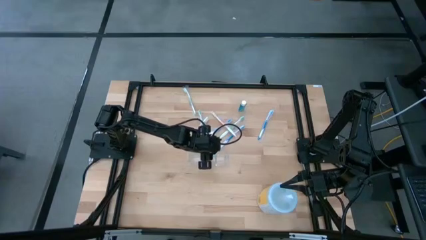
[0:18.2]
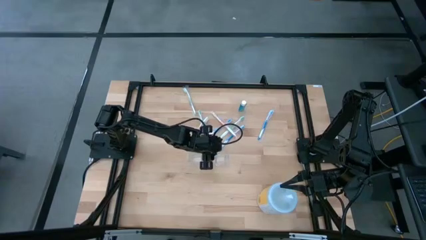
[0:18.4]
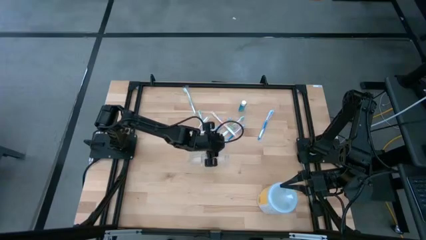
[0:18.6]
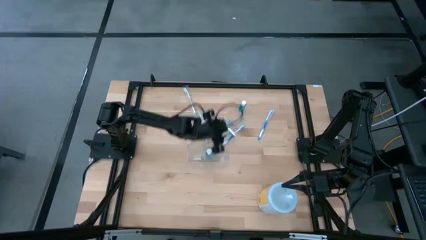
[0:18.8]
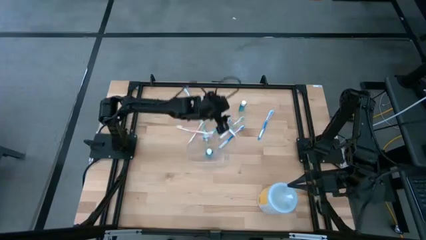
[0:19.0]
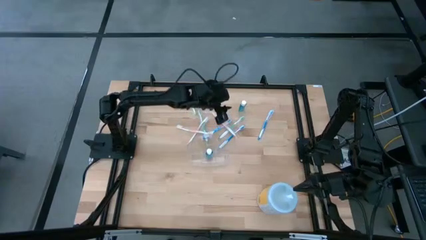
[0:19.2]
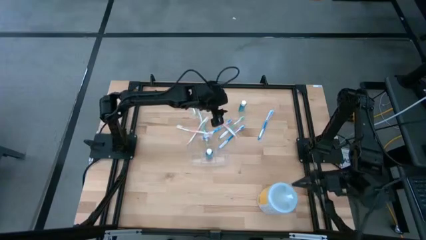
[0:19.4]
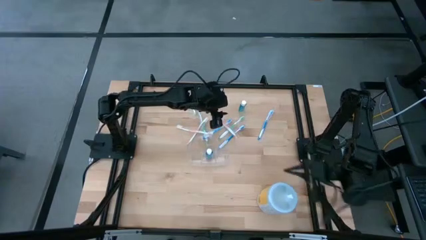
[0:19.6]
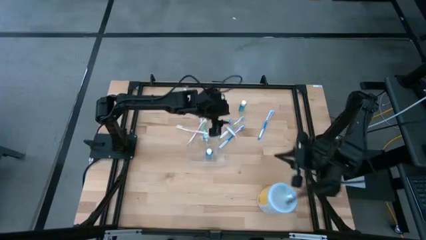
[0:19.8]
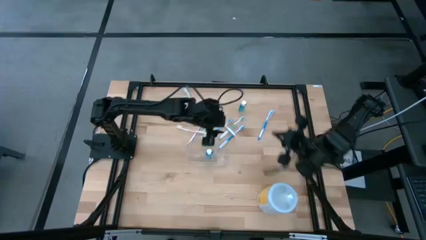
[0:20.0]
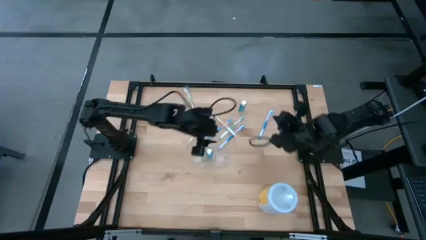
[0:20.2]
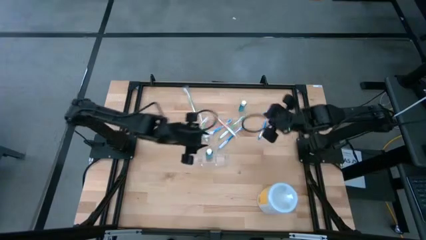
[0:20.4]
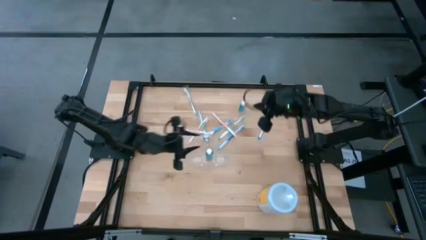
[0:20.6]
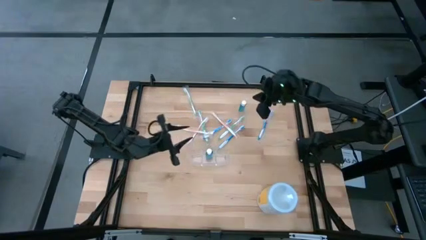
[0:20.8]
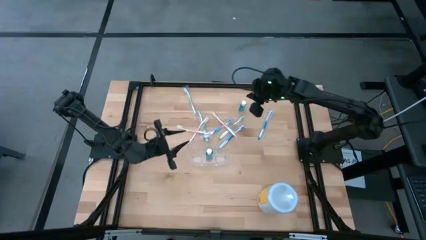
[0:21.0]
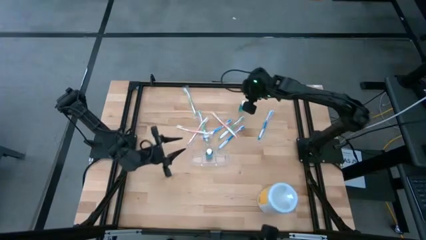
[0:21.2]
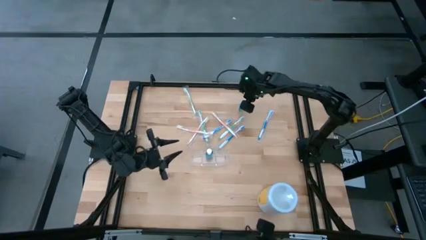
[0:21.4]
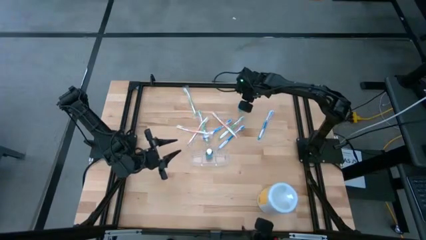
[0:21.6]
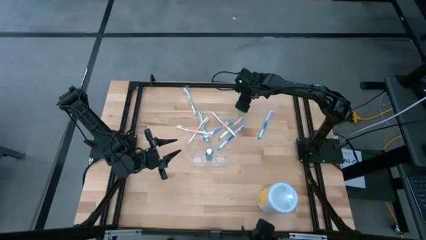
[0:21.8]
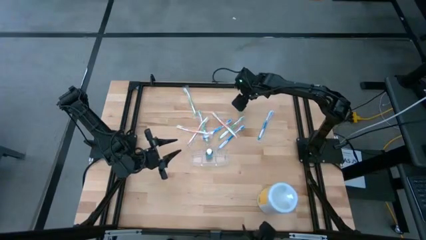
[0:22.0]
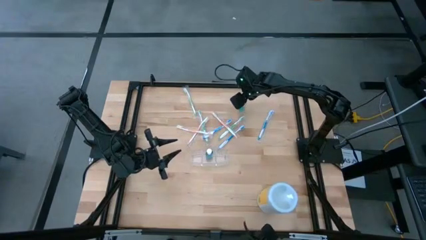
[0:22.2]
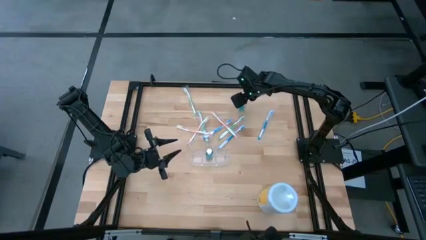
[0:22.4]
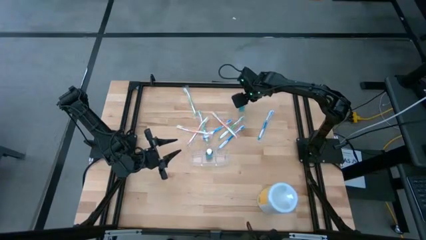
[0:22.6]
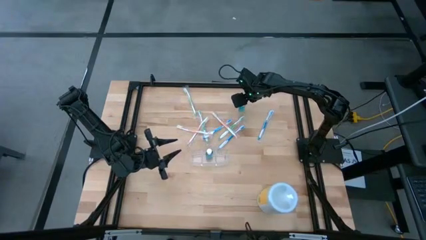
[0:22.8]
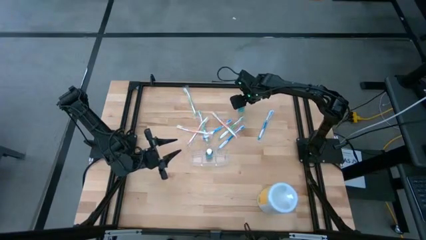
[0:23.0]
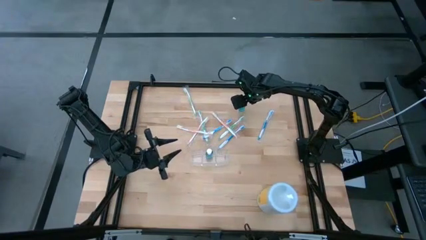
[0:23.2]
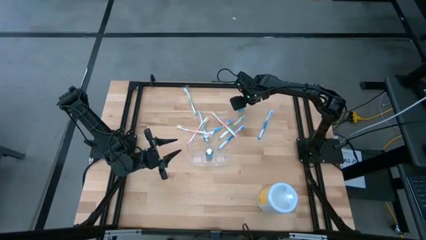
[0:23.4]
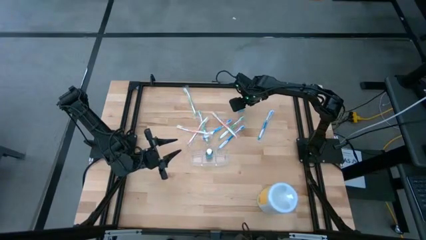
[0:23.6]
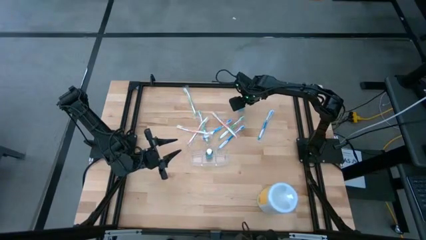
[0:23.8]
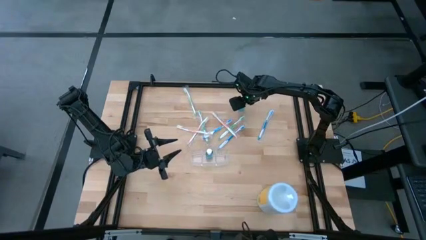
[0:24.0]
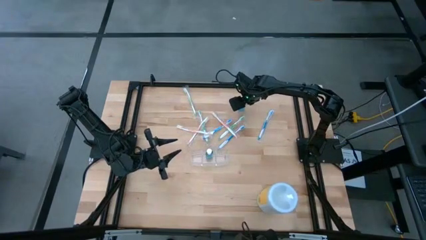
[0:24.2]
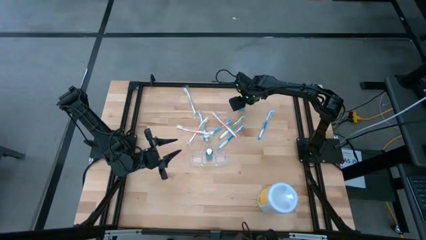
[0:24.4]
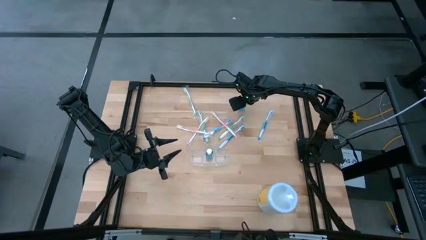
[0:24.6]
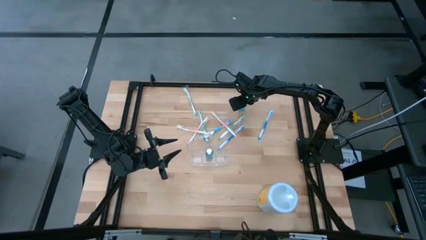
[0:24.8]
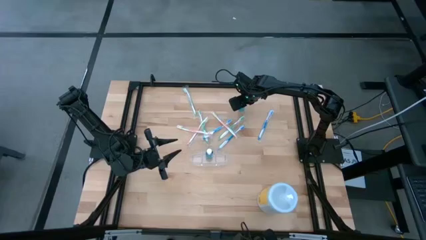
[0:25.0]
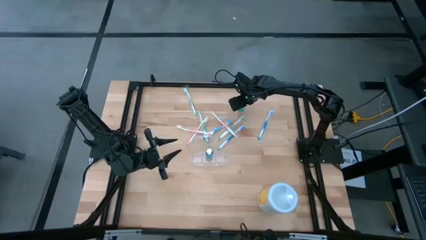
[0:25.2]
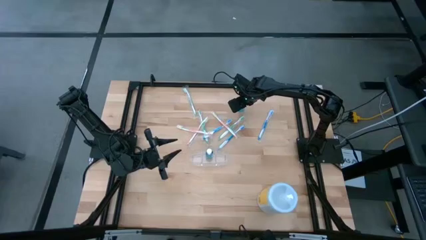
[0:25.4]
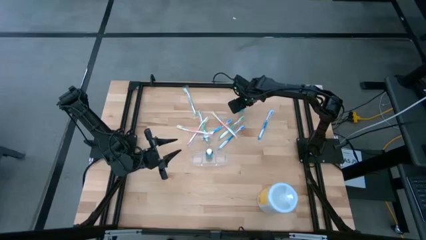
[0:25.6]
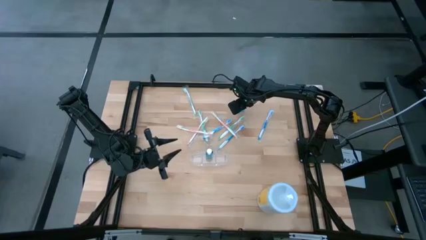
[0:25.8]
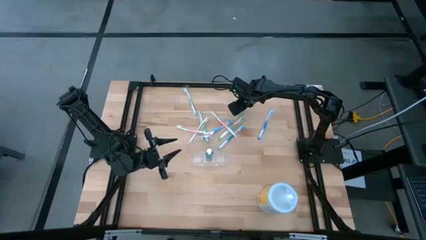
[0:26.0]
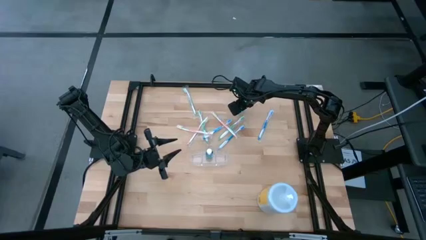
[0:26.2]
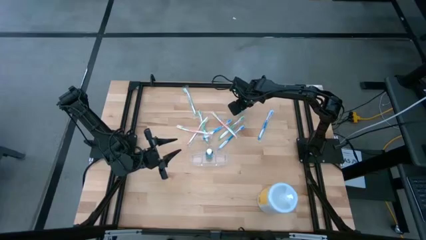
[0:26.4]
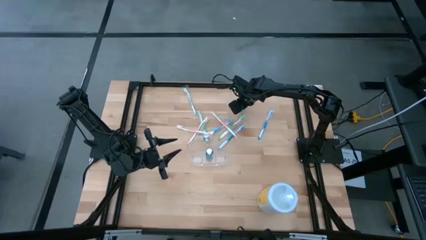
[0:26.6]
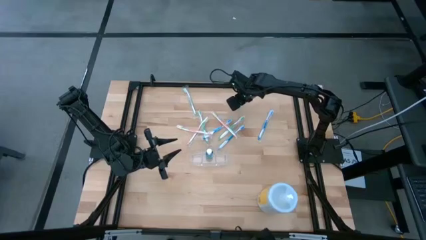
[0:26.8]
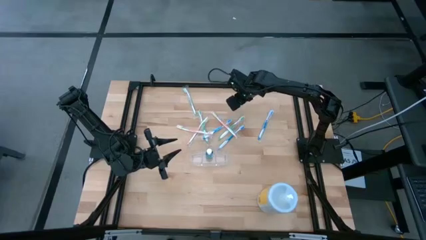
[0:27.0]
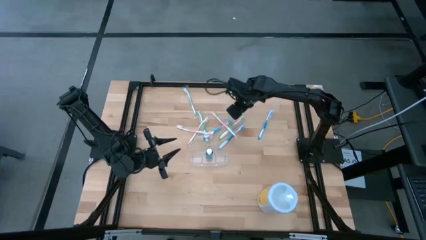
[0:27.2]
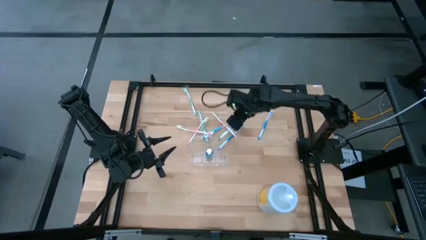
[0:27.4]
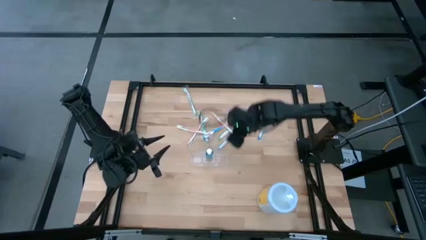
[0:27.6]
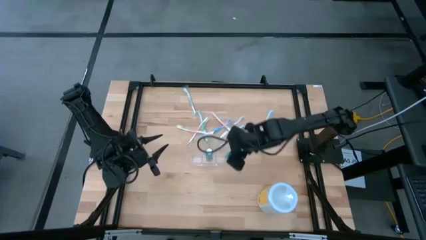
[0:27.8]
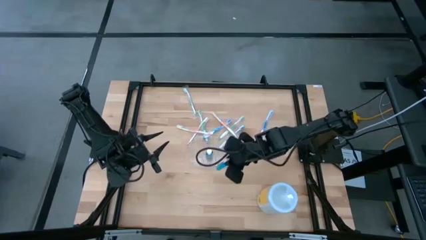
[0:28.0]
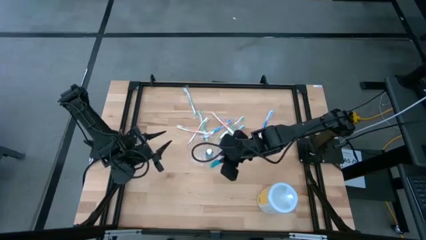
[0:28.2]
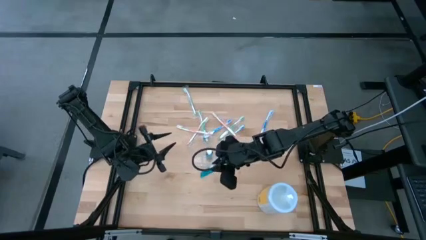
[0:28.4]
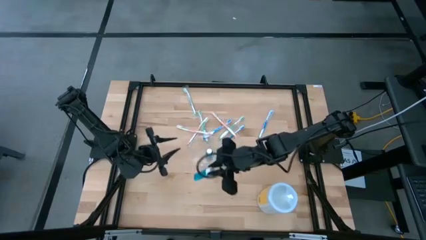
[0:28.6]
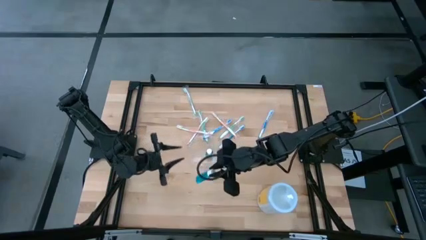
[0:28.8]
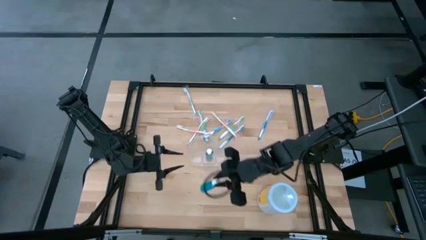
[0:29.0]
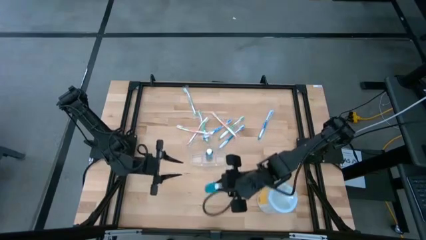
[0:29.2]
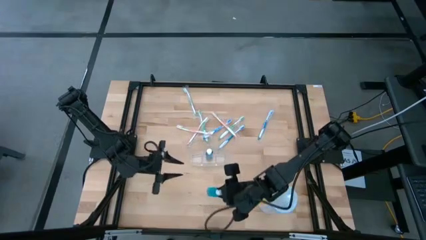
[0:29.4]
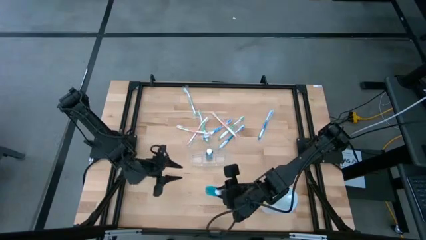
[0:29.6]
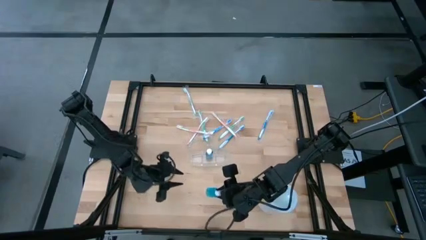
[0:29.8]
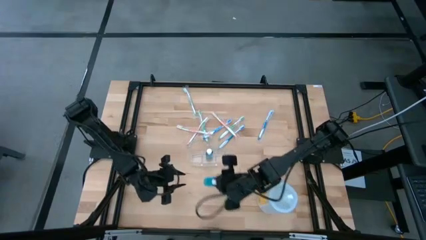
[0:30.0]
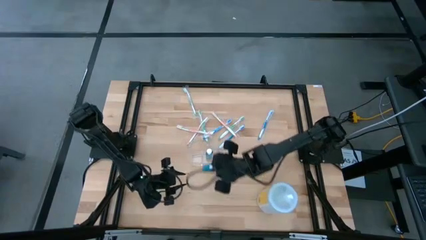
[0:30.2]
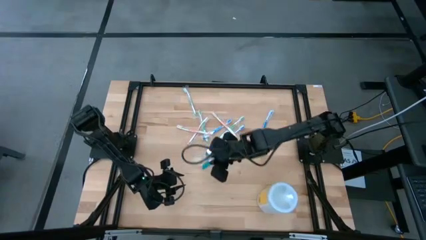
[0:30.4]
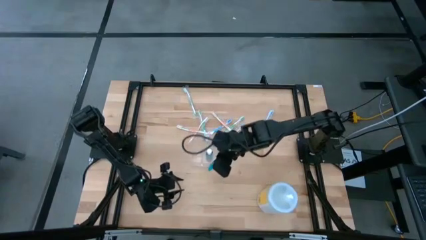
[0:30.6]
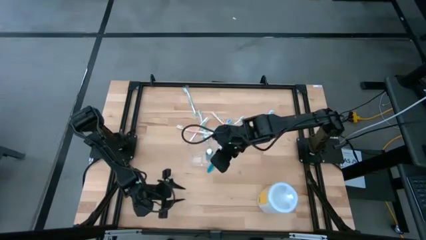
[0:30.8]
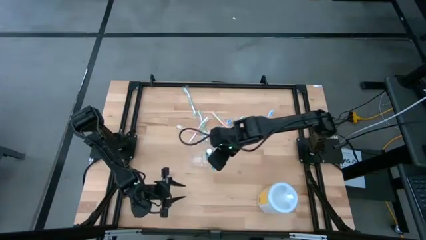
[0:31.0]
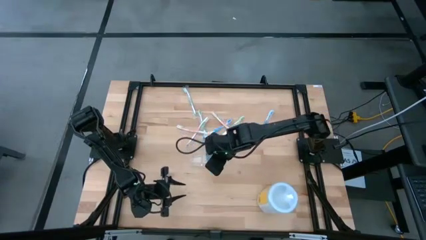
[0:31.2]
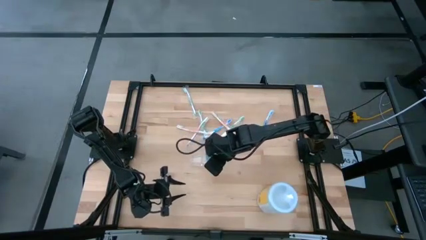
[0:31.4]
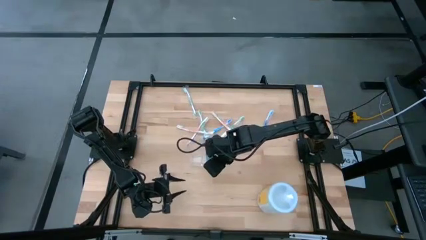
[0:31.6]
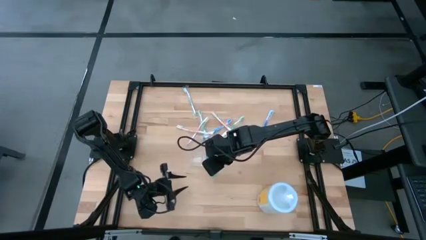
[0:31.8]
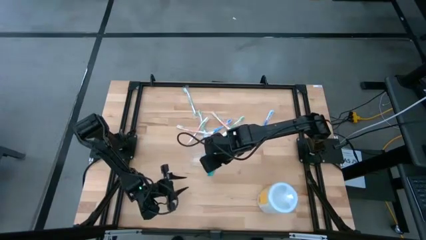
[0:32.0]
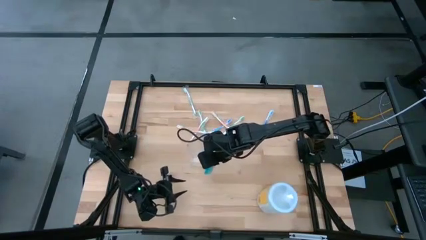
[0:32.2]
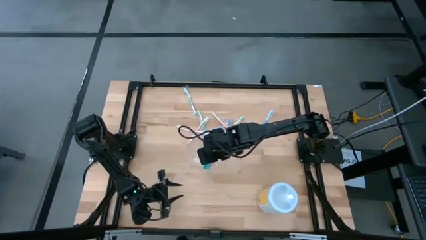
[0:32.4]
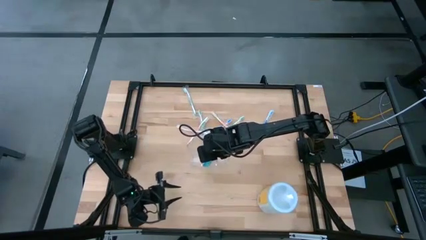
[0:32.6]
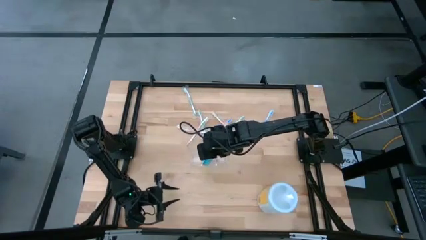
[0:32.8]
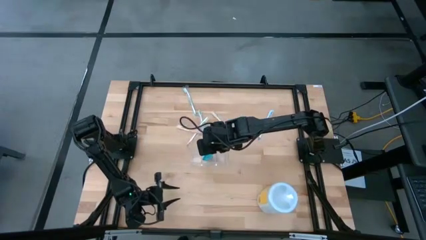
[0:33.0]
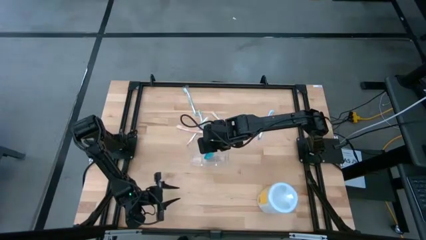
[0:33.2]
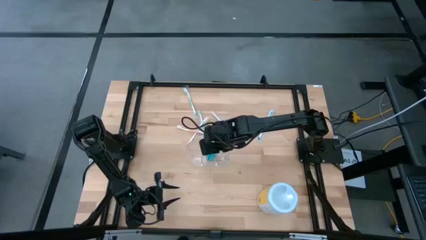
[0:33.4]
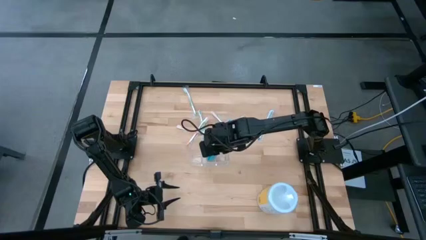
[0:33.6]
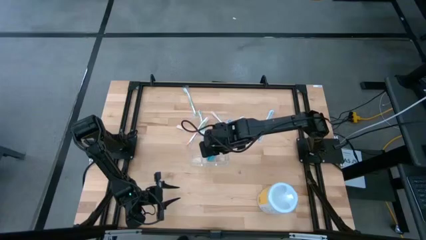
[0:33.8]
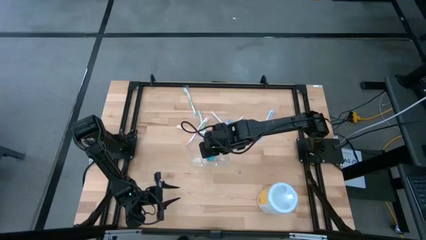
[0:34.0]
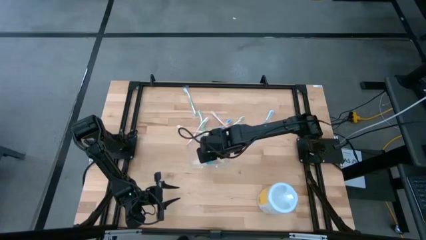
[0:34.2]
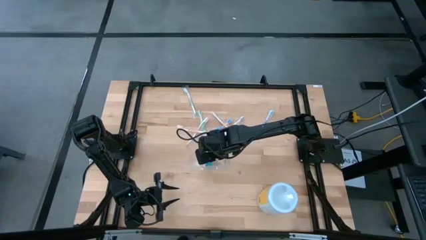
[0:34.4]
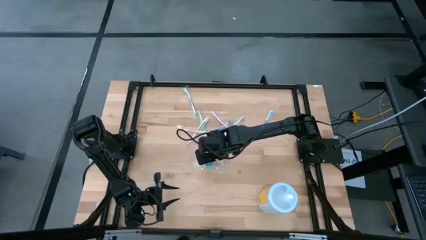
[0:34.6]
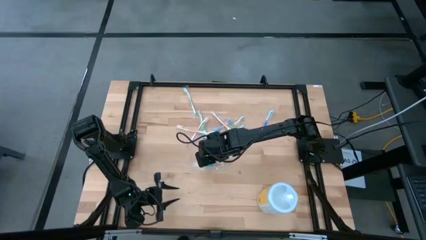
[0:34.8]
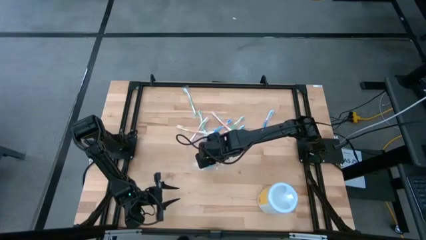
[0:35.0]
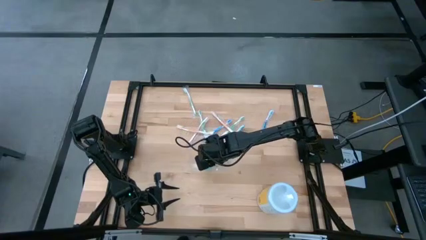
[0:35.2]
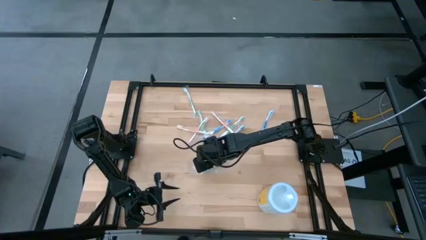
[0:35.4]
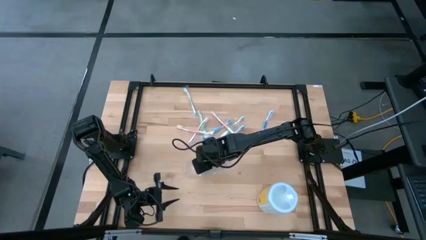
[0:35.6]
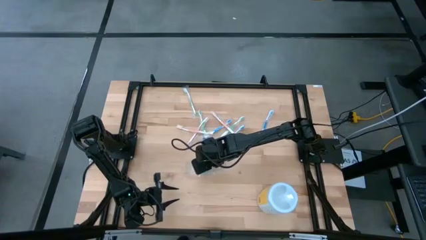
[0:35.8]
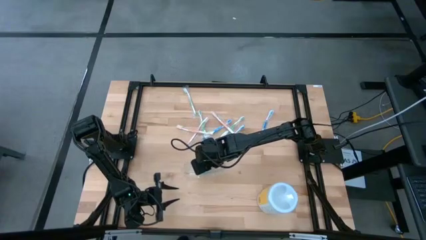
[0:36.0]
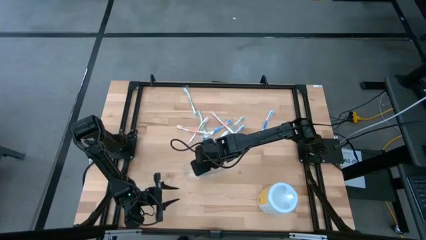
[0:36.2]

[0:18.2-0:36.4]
Task: Pick & Place toothbrushing station
Put the blue mouthwash into the transparent organizer
